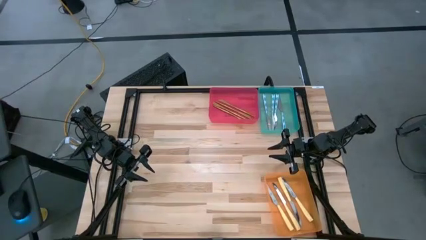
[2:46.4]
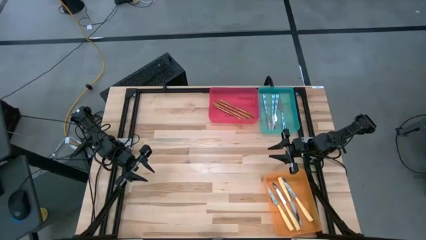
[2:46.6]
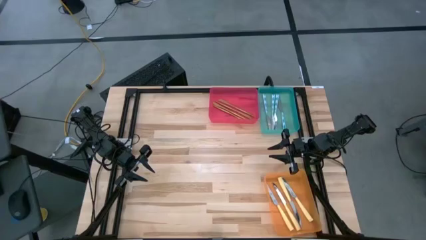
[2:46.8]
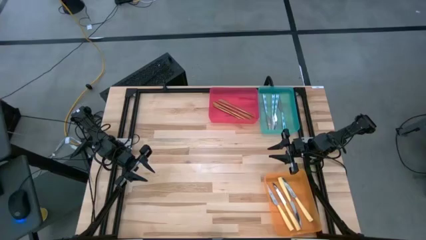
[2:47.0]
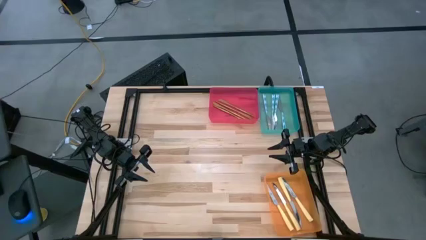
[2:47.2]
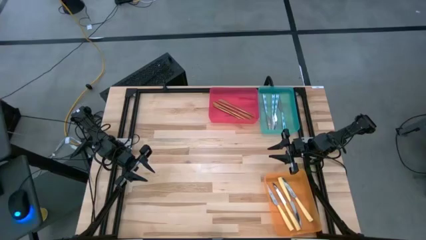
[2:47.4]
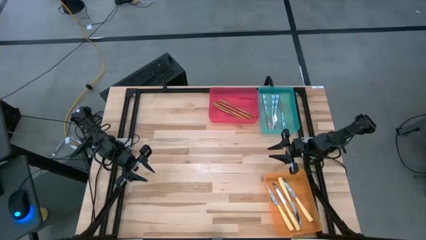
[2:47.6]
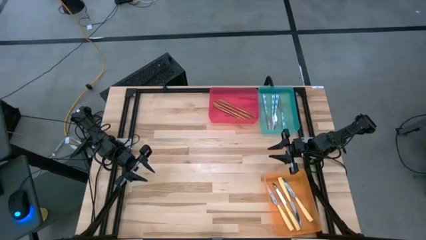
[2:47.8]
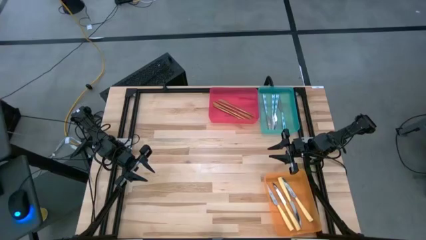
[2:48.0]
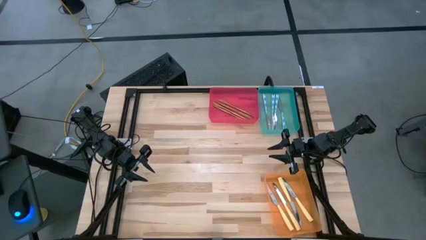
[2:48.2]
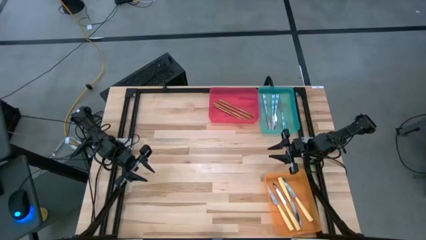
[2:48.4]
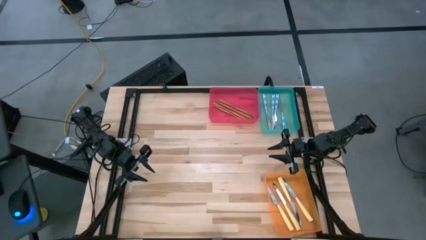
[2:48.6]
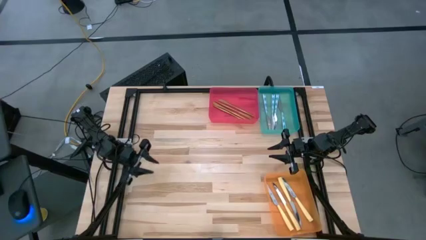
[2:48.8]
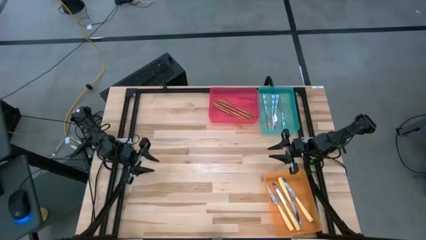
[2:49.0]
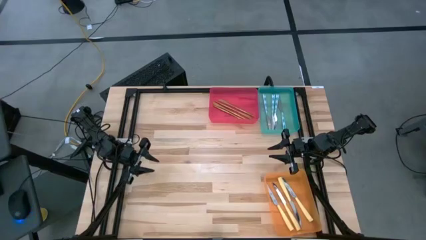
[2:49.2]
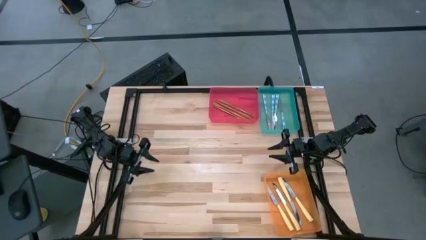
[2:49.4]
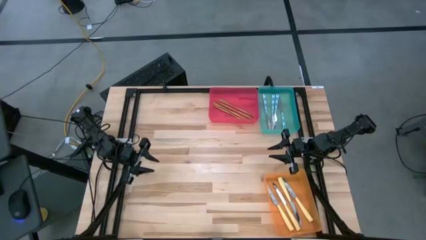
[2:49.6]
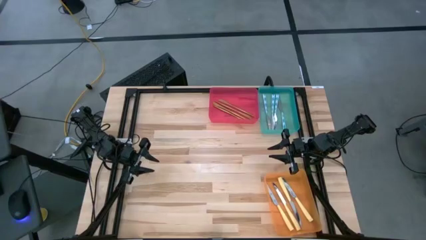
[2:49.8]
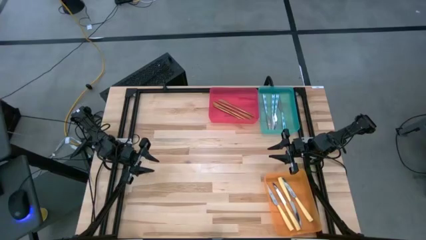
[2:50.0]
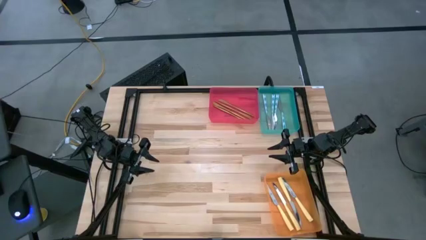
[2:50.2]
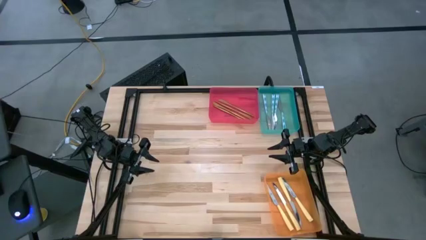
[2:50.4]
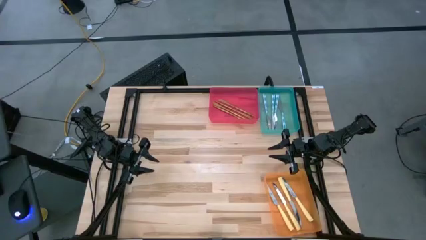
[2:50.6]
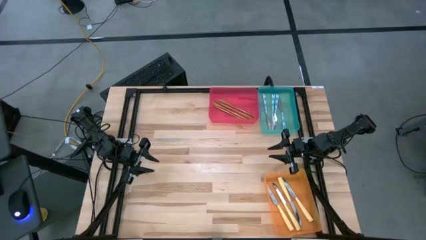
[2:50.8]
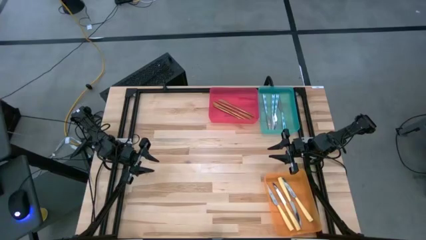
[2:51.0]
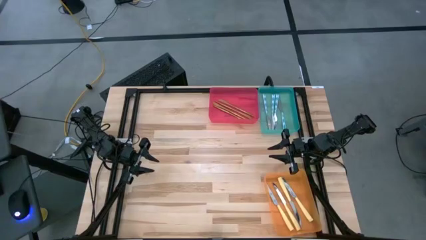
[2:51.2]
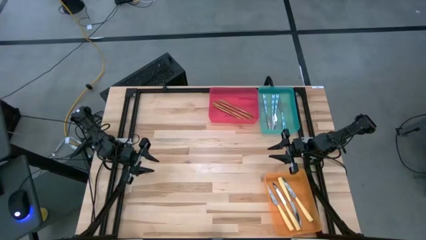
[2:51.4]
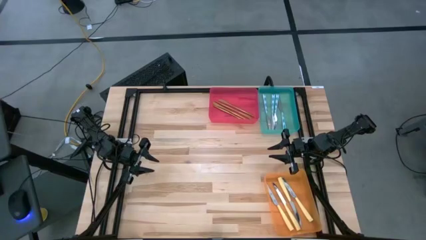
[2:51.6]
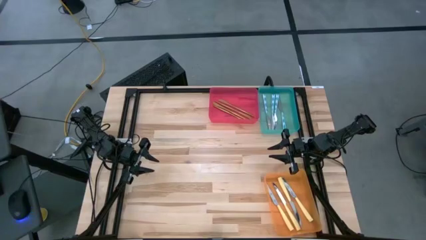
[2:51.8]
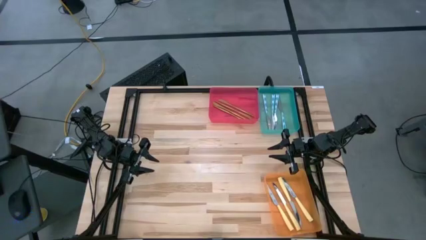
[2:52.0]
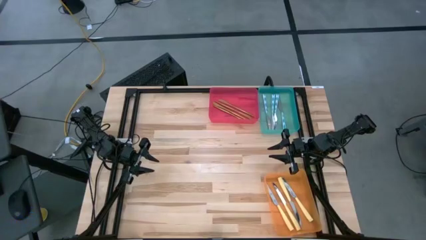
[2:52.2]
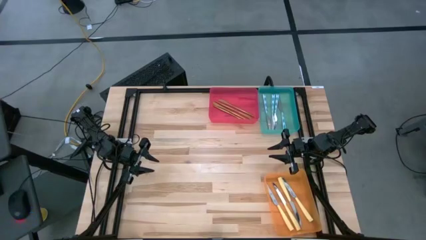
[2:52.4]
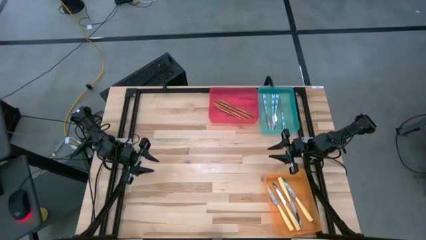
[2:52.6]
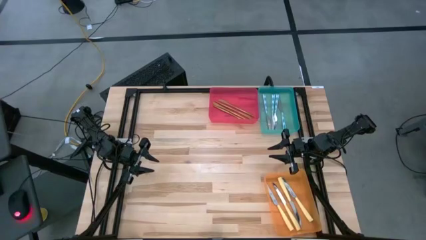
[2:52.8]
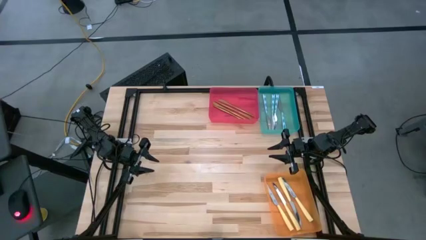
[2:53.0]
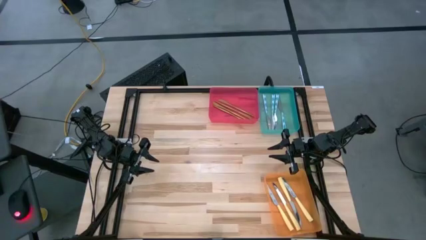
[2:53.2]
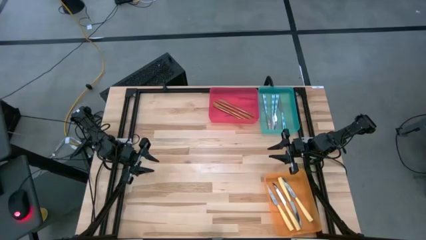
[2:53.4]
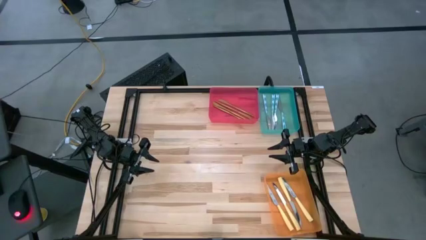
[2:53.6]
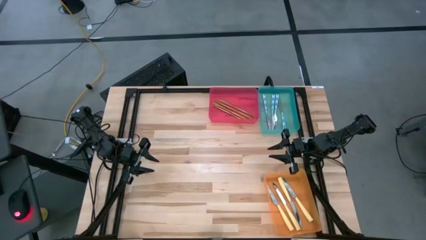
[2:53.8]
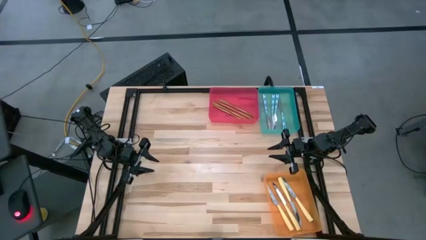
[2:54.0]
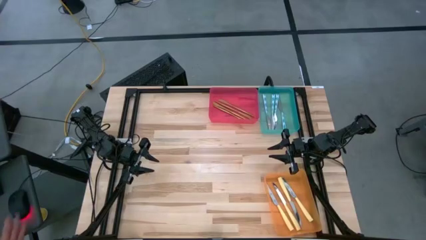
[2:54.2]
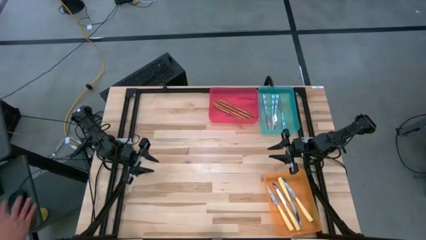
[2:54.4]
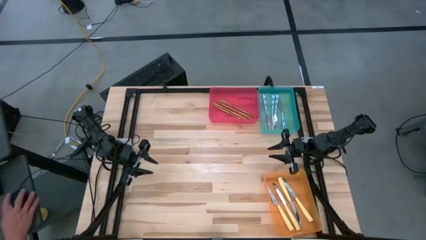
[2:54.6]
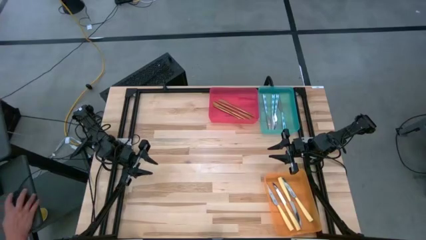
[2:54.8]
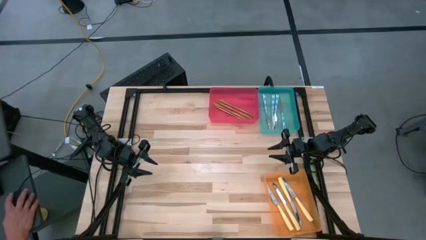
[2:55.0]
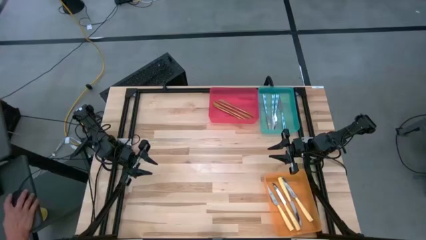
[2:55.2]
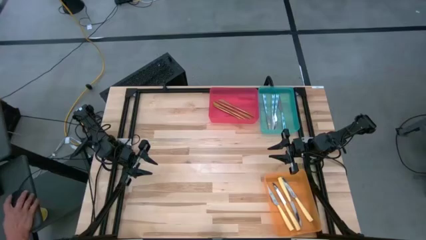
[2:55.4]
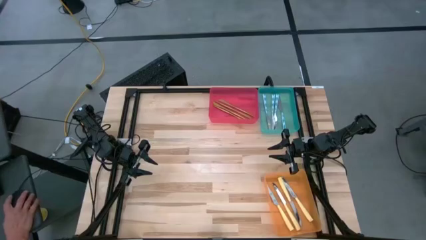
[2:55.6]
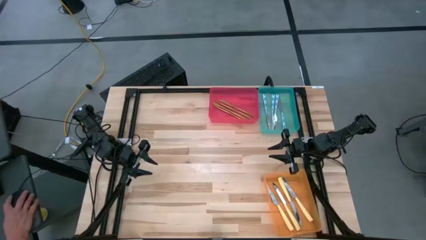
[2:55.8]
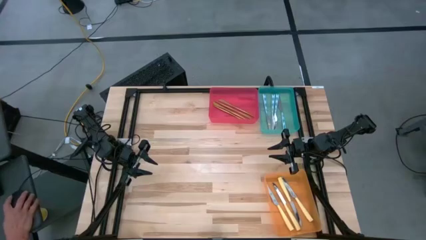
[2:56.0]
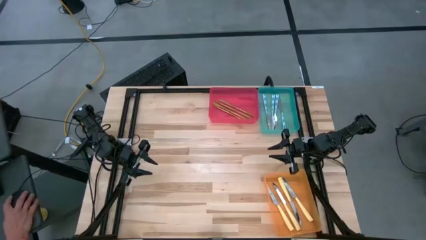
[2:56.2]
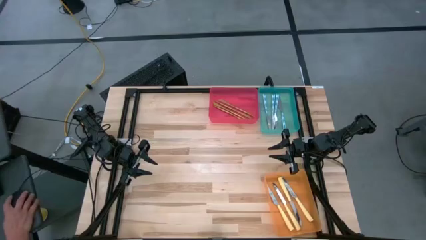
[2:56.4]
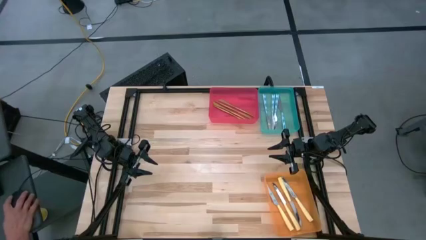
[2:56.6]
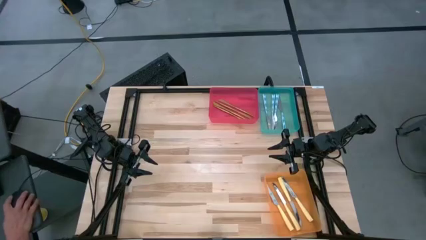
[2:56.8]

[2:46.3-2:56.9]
Task: Sort silverware by color (type)
Return to Home Position

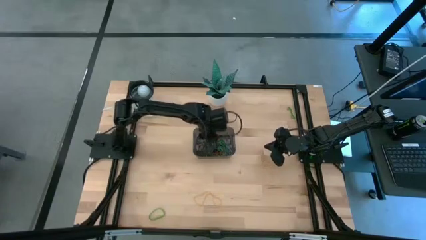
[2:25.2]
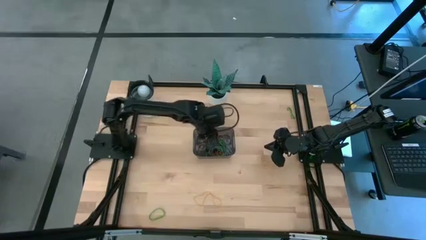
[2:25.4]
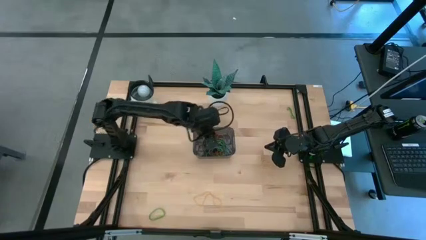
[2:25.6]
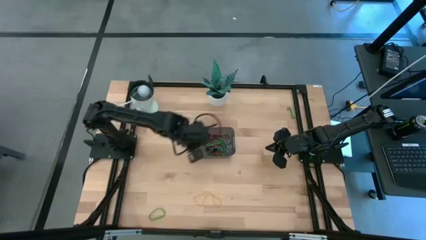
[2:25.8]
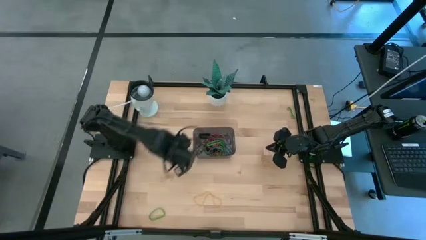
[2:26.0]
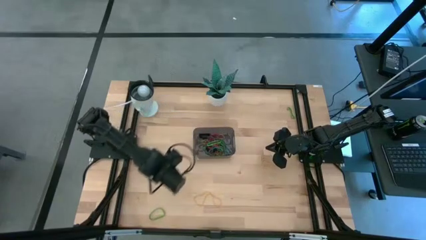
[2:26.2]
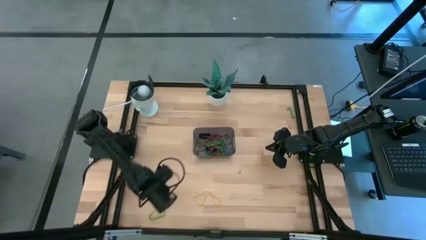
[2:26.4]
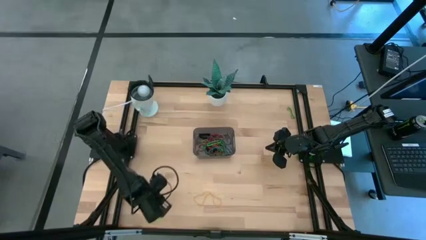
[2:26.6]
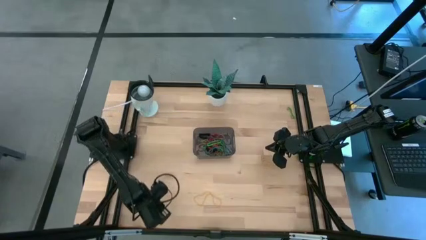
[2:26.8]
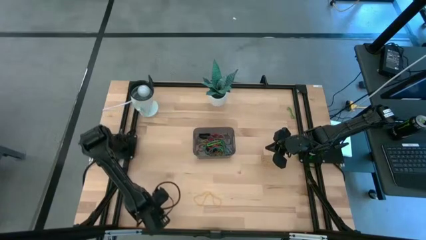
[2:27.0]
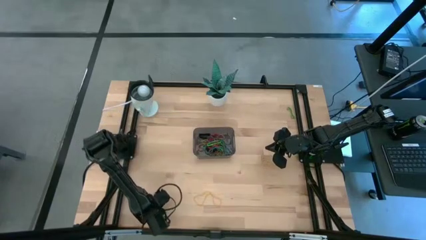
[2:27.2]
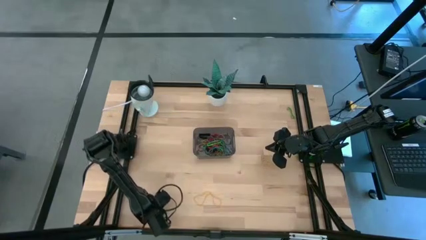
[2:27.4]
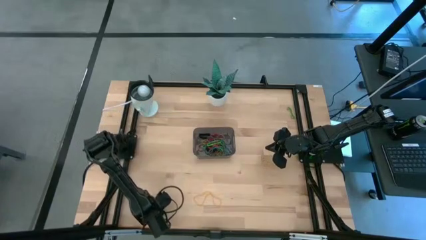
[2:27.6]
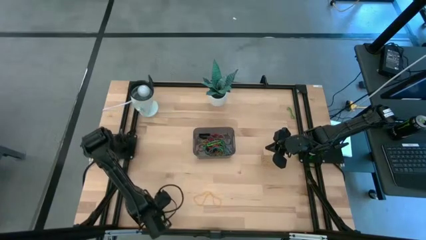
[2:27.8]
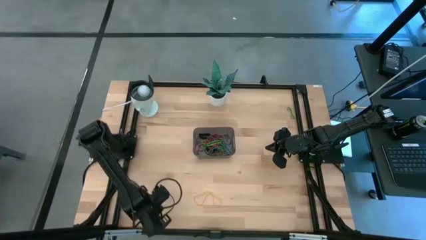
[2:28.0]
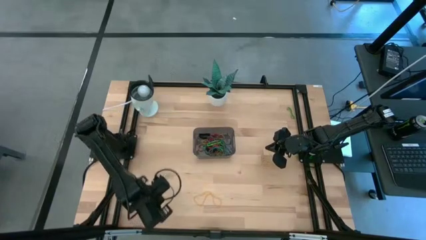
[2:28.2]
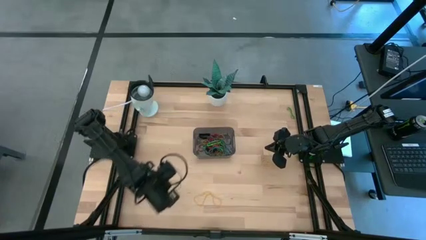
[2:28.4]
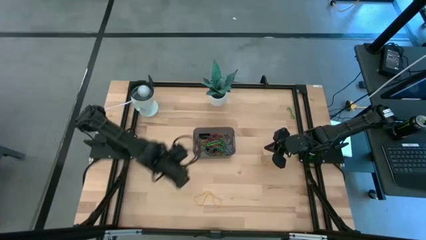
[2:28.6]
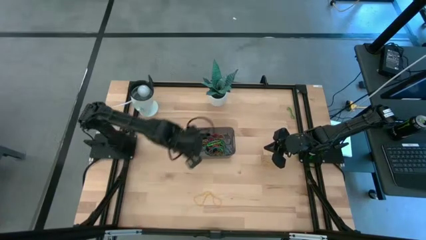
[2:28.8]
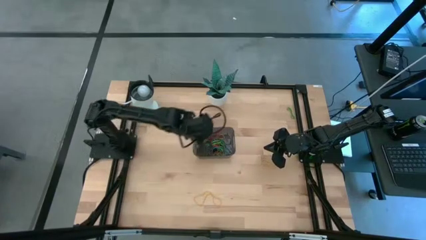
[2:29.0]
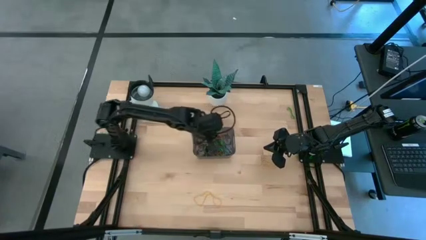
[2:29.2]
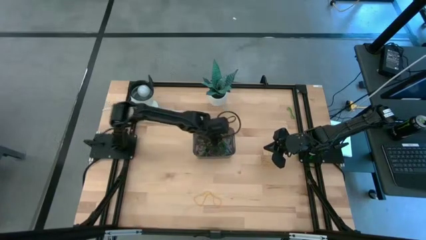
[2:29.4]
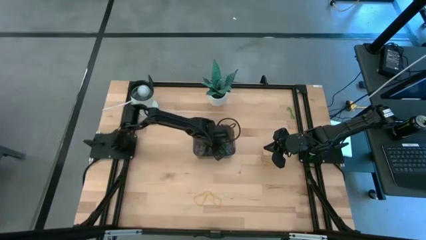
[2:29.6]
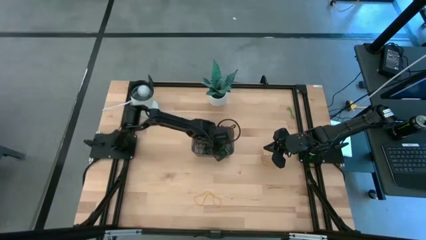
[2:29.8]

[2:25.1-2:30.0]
Task: Pick and place rubber bands into bin
Put the green rubber band into the black bin
